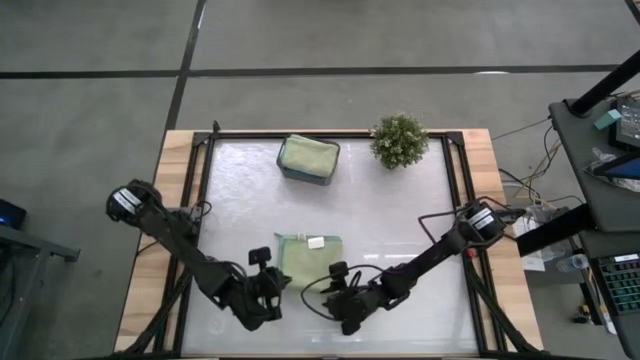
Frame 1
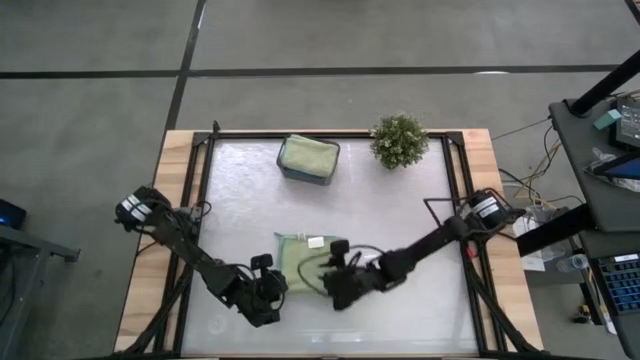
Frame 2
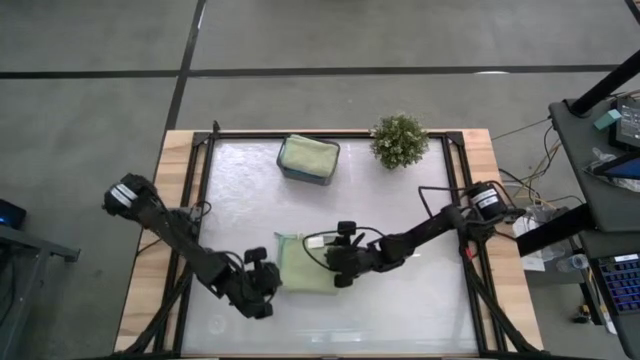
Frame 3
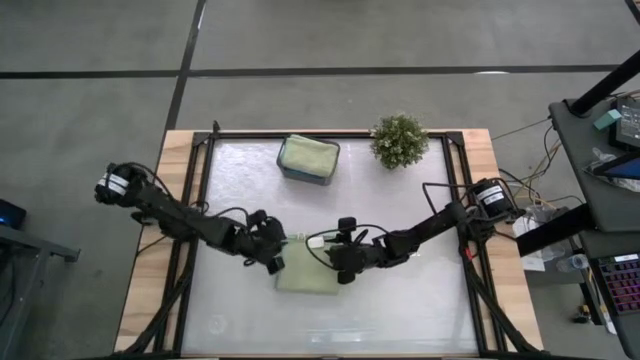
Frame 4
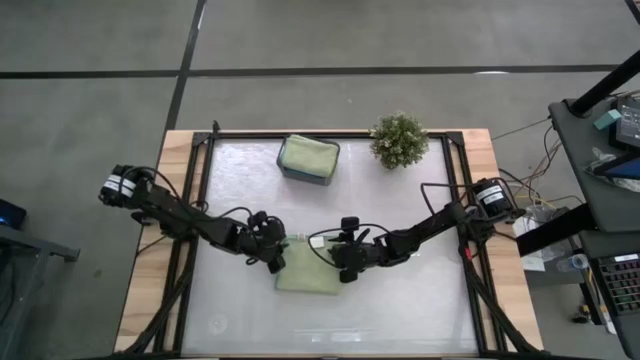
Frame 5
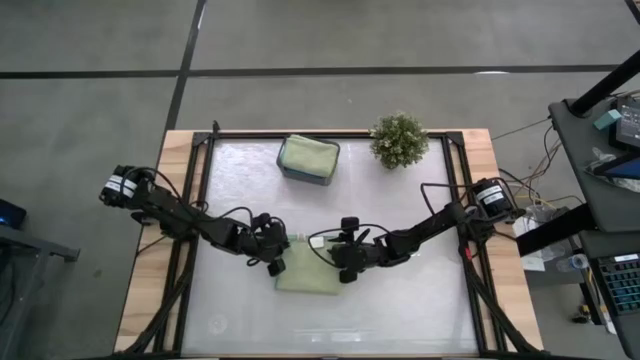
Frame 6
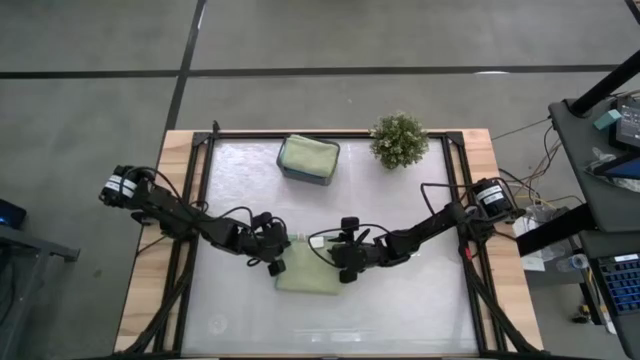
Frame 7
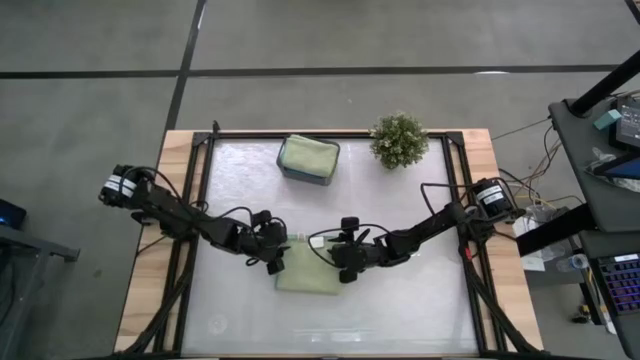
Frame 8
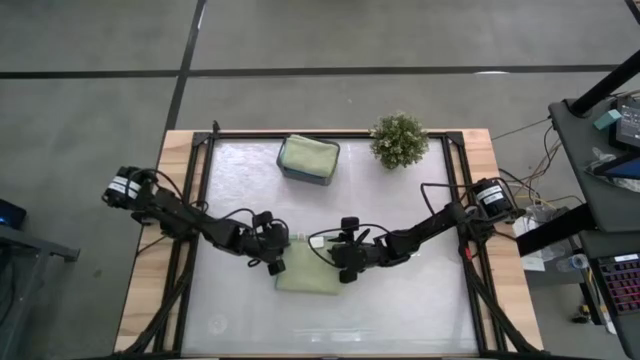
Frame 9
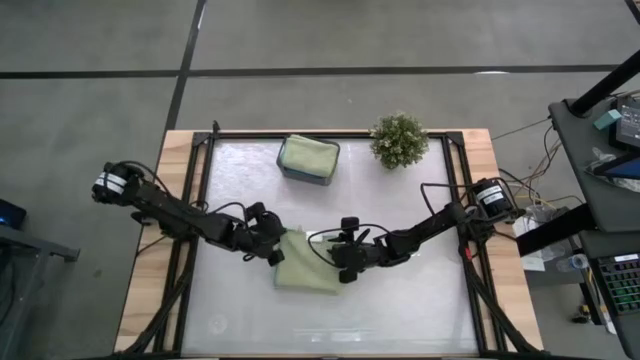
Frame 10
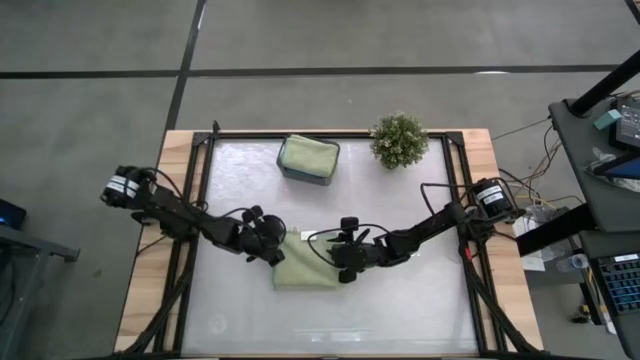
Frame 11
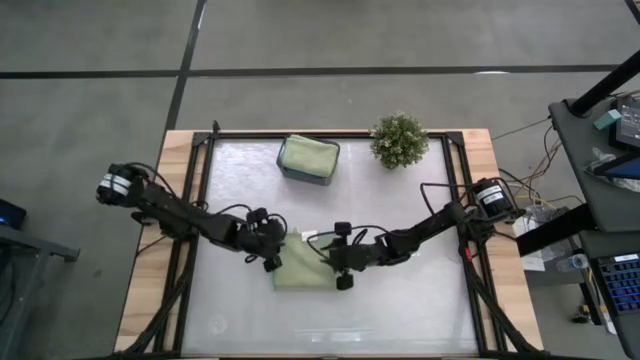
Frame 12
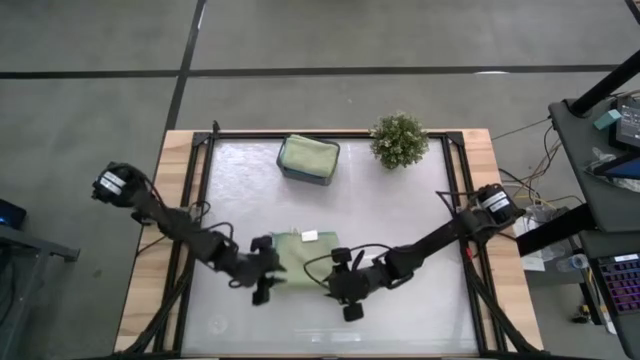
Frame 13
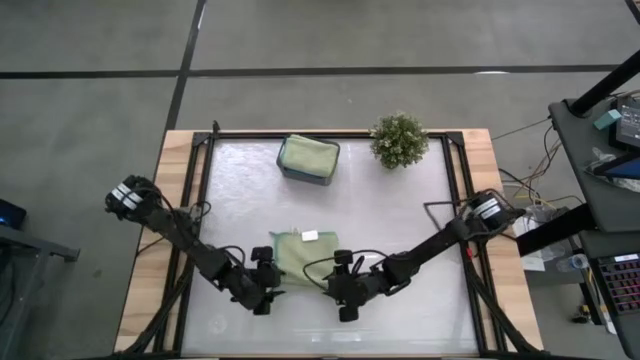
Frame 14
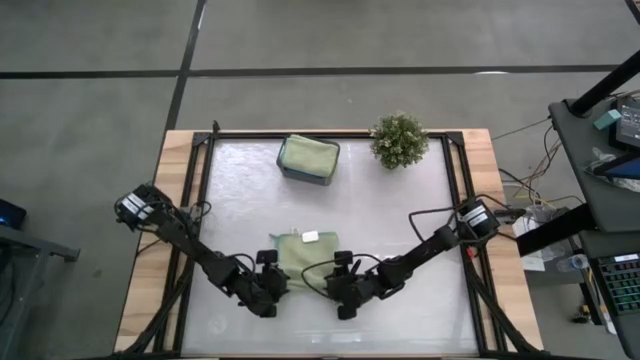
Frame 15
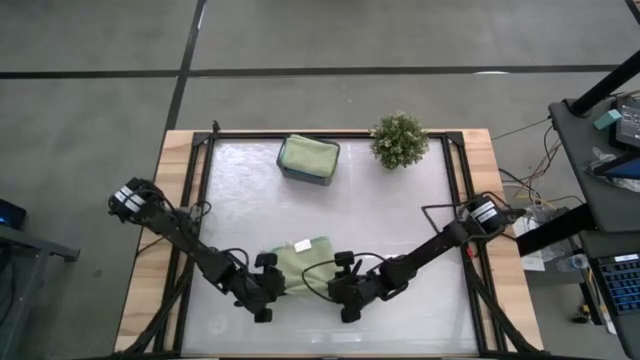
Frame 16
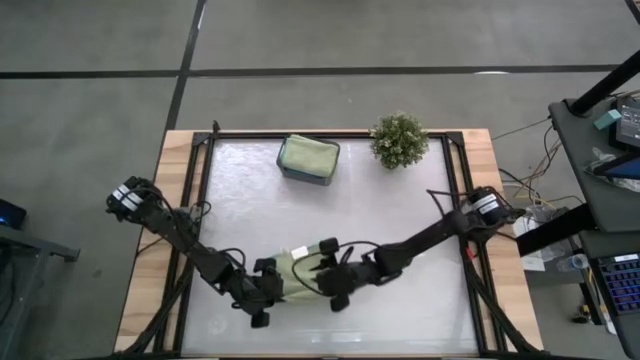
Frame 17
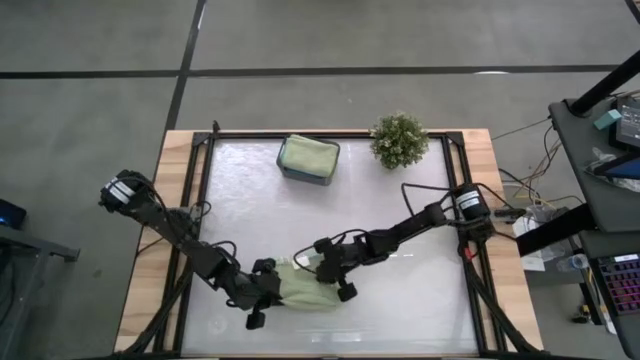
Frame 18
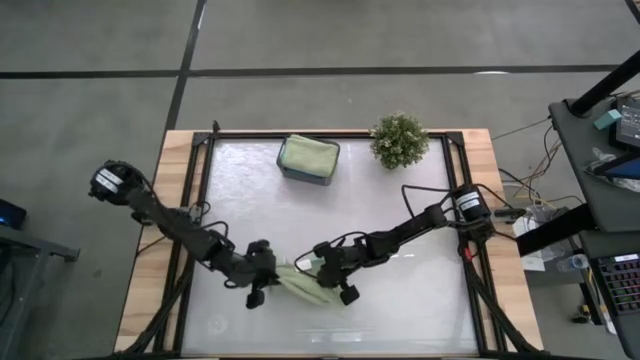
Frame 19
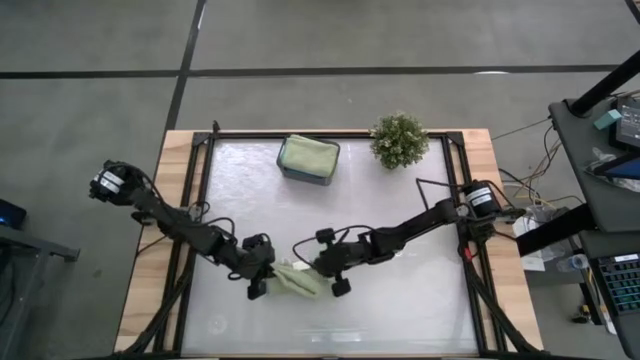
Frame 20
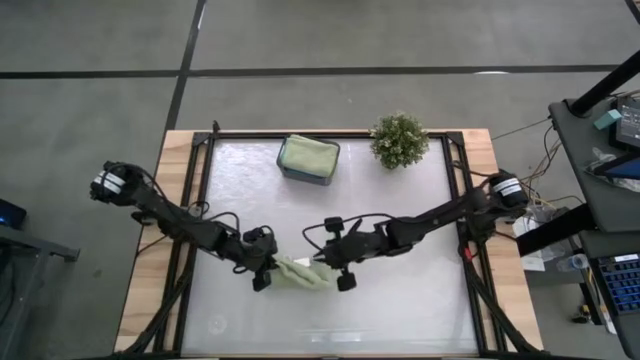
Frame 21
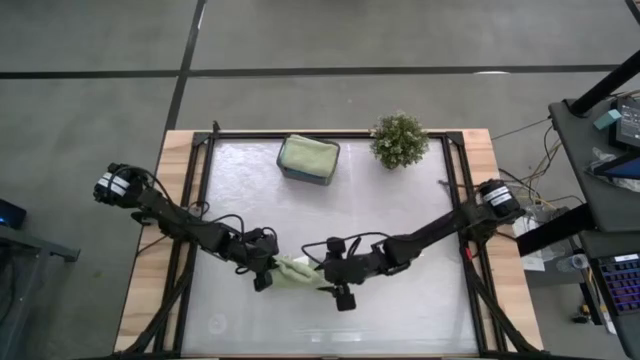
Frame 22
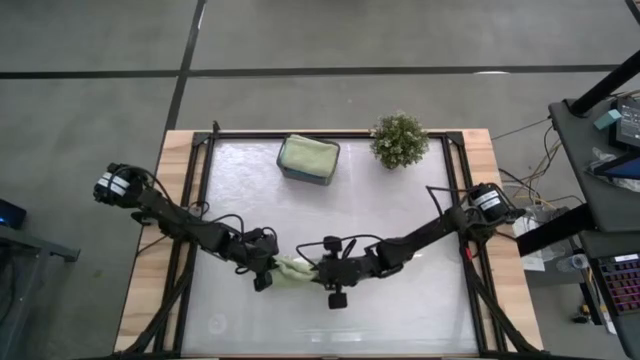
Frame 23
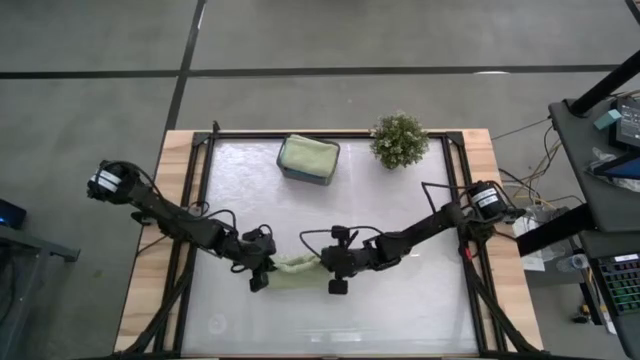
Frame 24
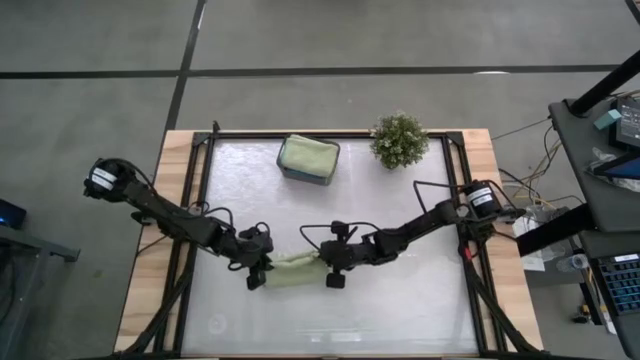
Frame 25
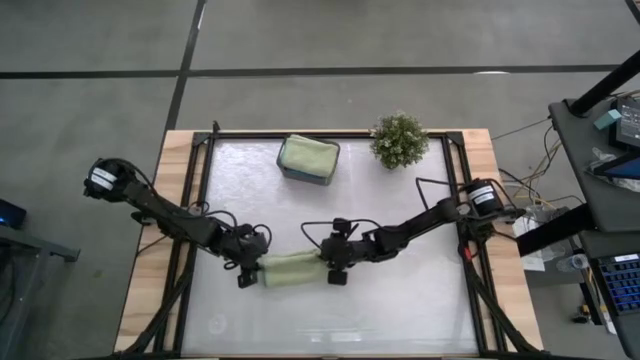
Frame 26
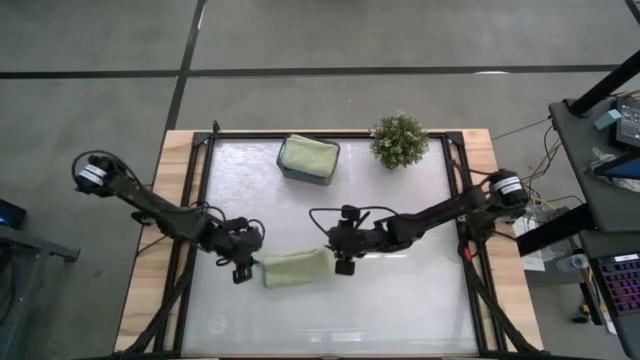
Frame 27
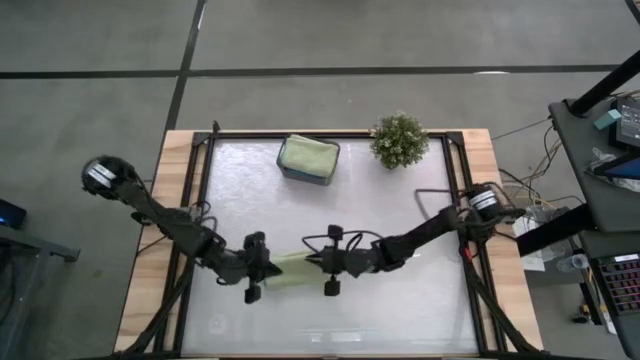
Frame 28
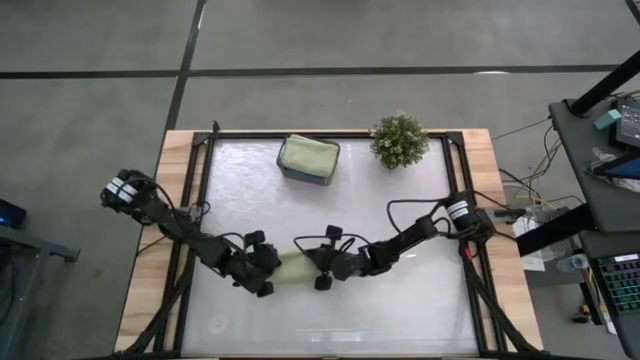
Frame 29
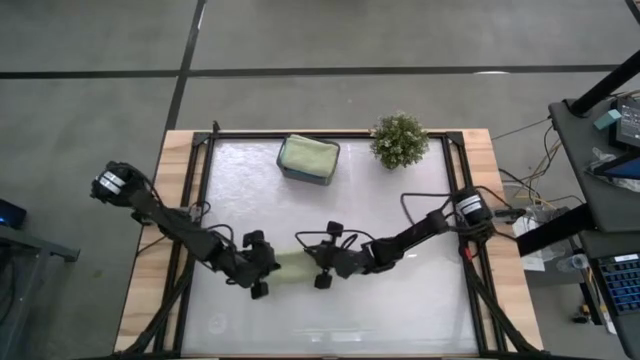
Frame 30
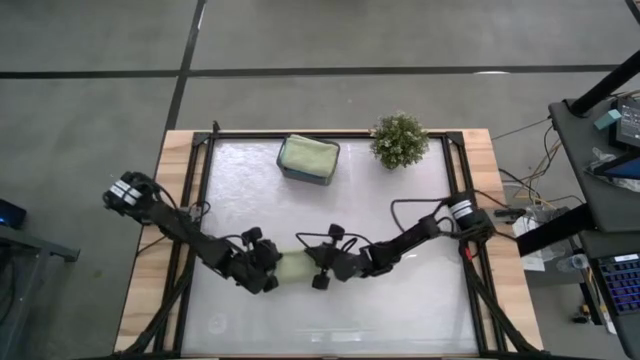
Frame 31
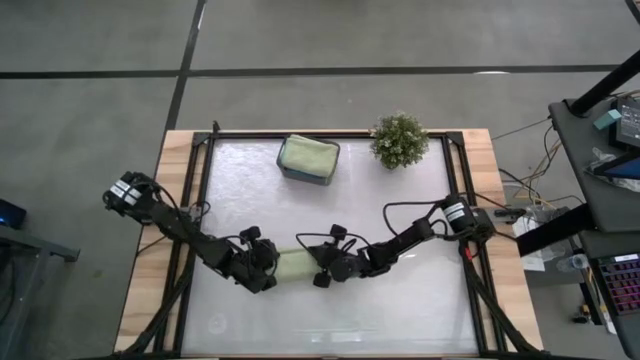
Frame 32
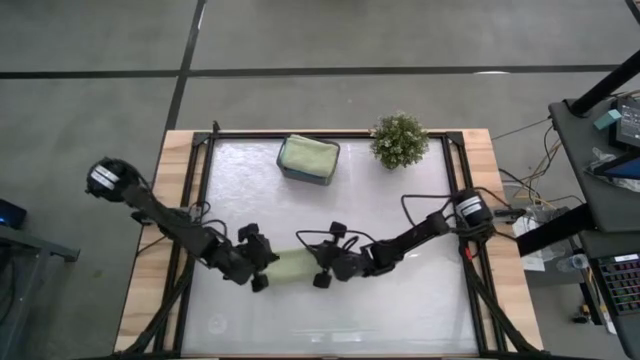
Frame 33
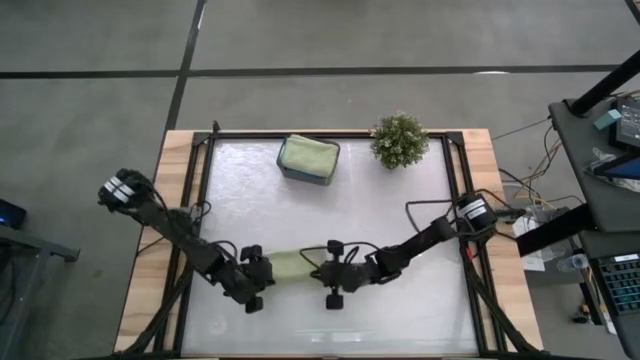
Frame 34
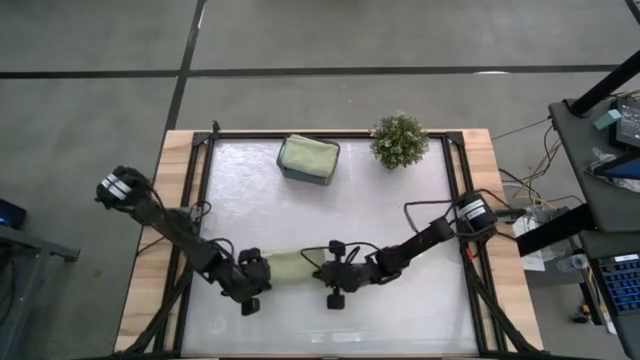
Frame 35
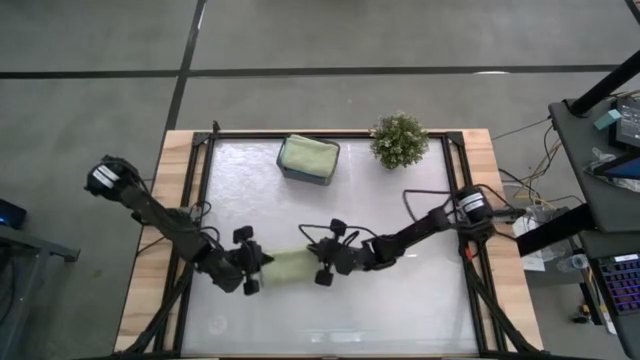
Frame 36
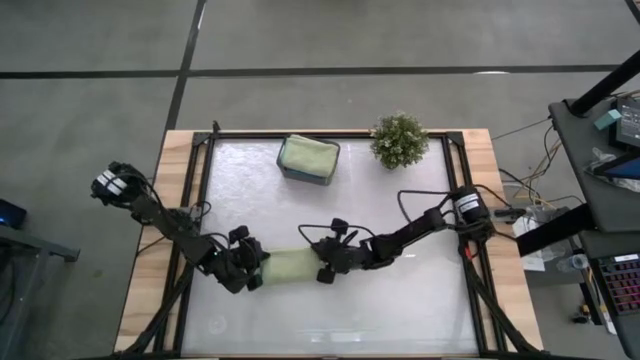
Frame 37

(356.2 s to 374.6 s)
Task: Fold microfiber towels
Fold the green microfiber towel

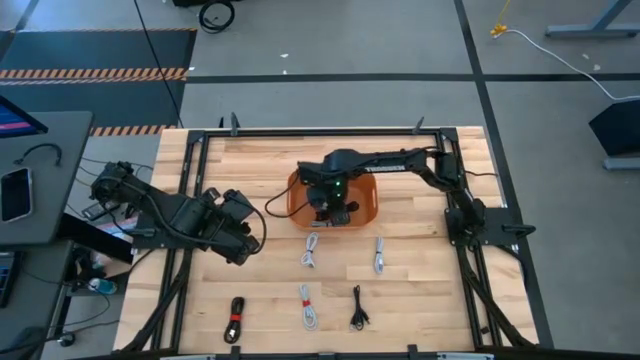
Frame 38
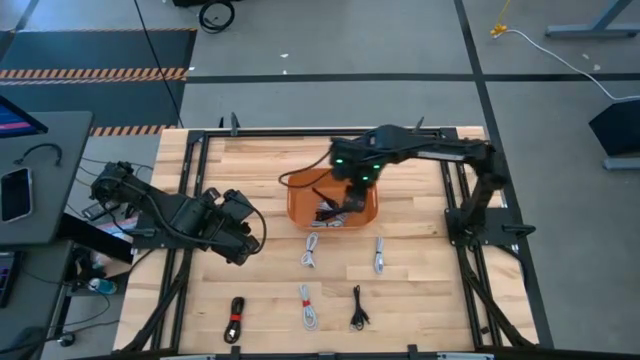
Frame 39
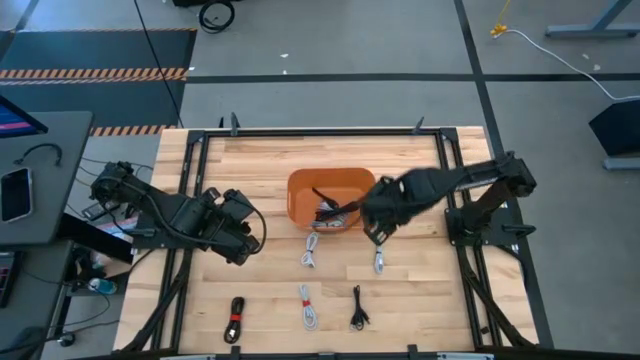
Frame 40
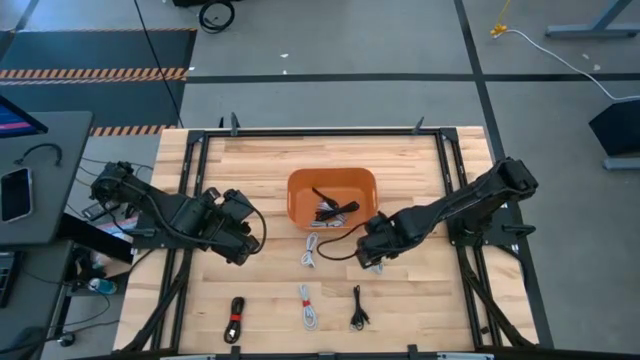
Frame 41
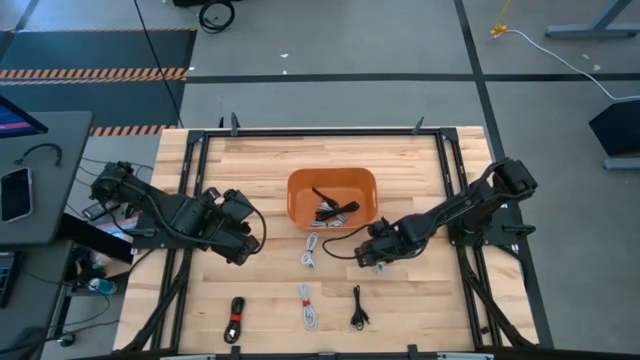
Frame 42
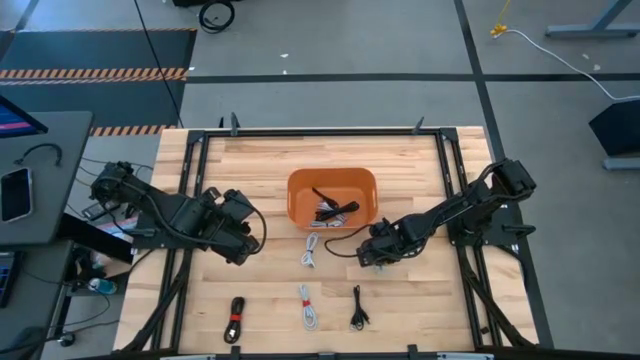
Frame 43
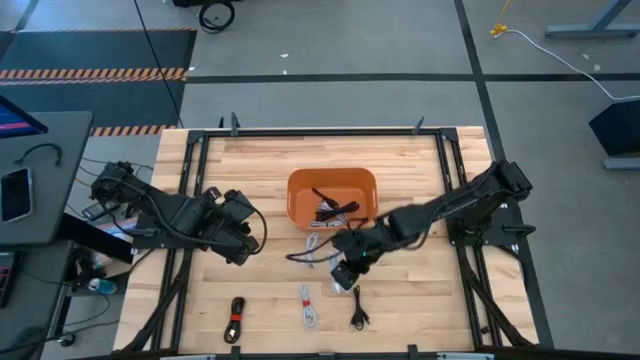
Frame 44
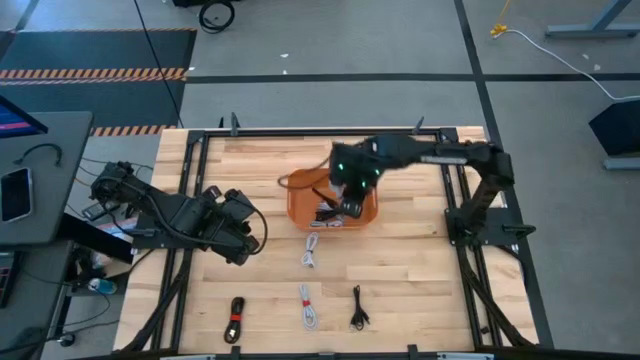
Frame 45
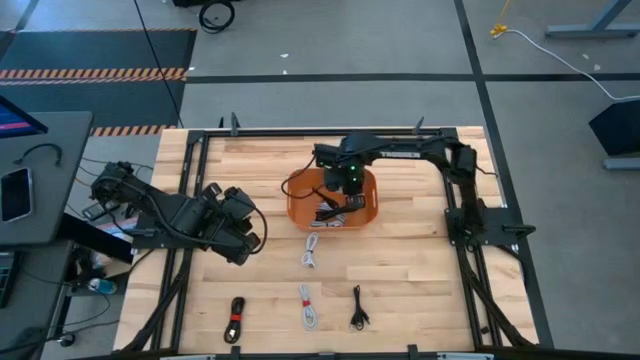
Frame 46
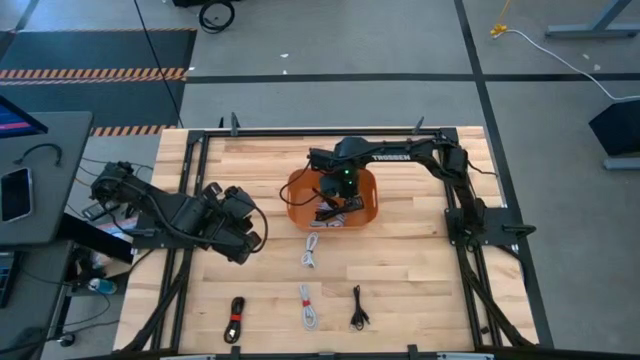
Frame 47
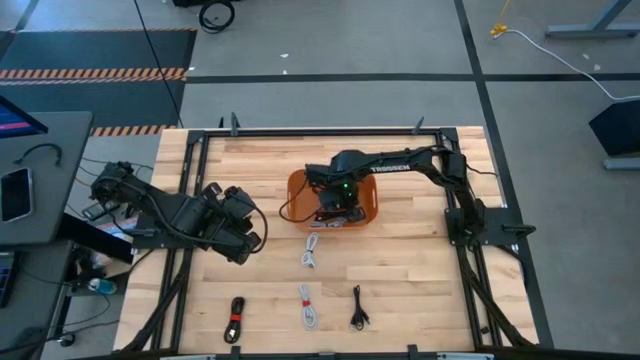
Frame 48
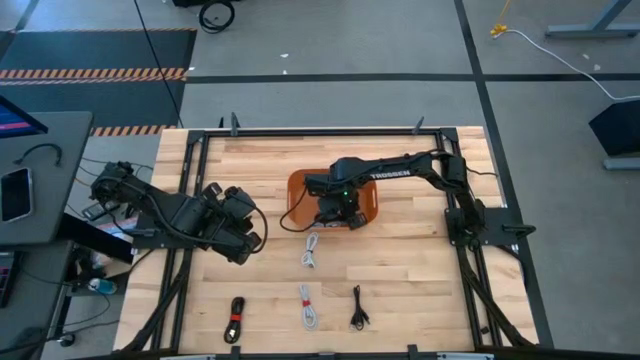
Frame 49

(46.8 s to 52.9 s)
Task: Pick and place USB-C Cables
Put the white USB cable into the orange bin
